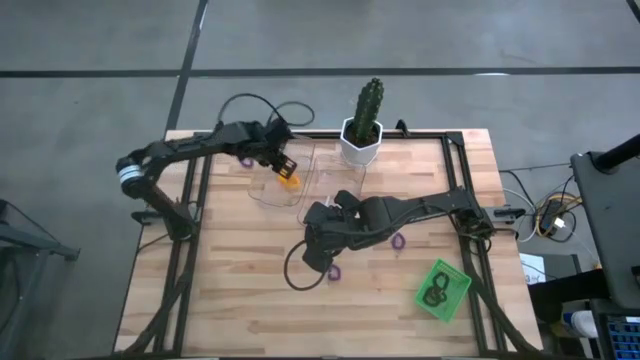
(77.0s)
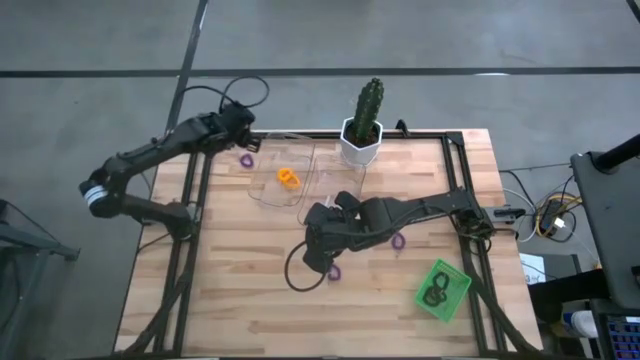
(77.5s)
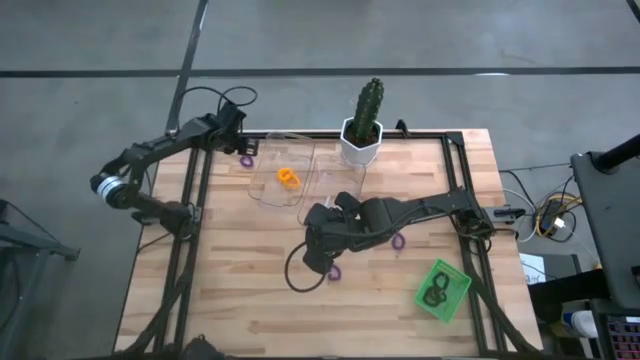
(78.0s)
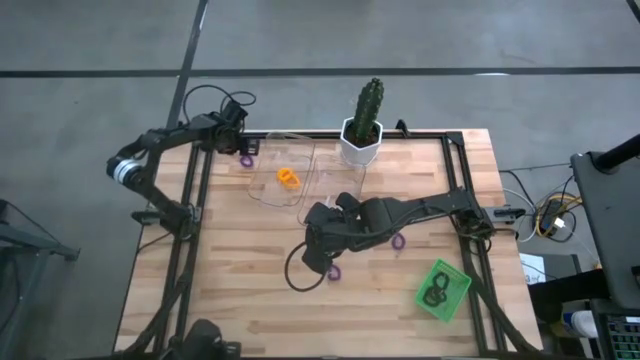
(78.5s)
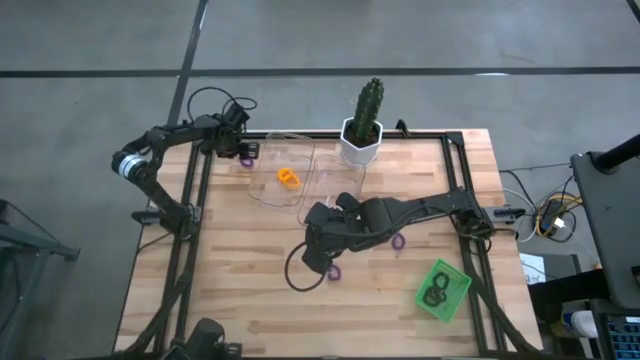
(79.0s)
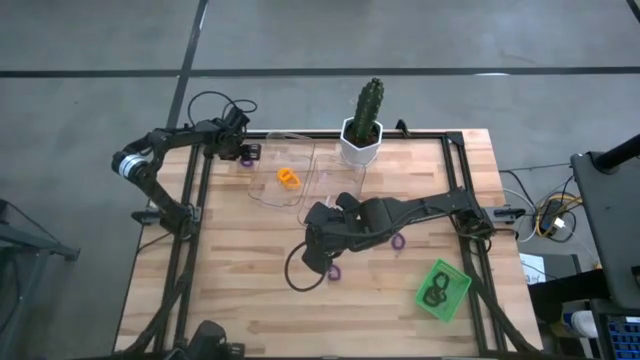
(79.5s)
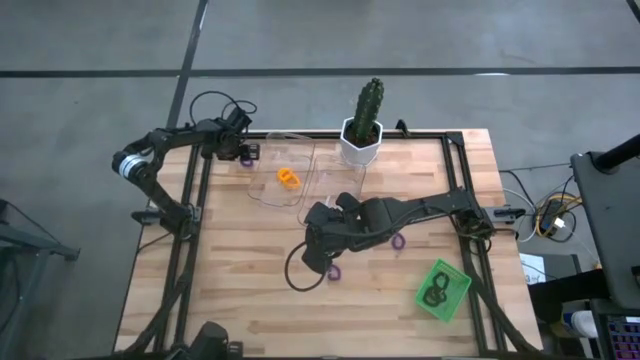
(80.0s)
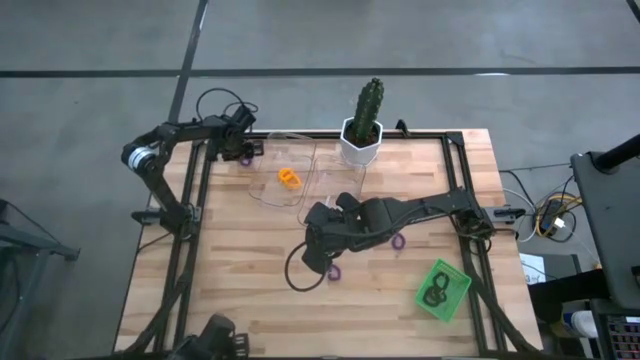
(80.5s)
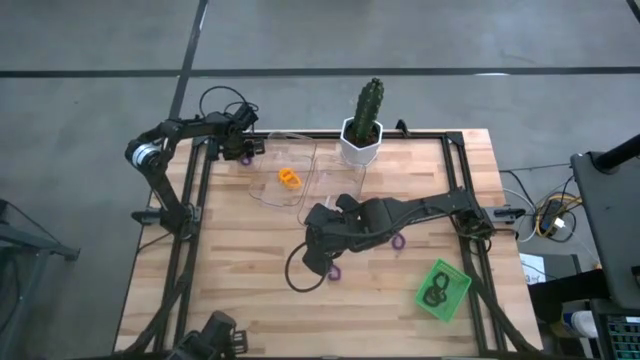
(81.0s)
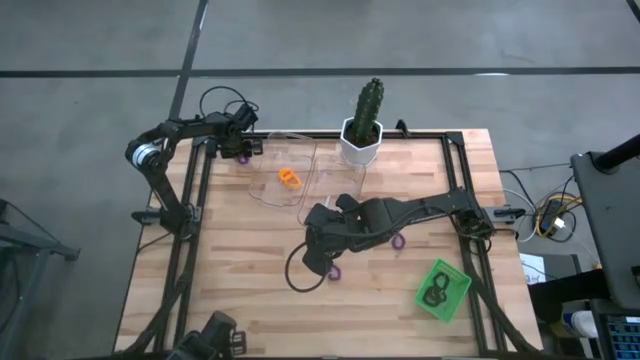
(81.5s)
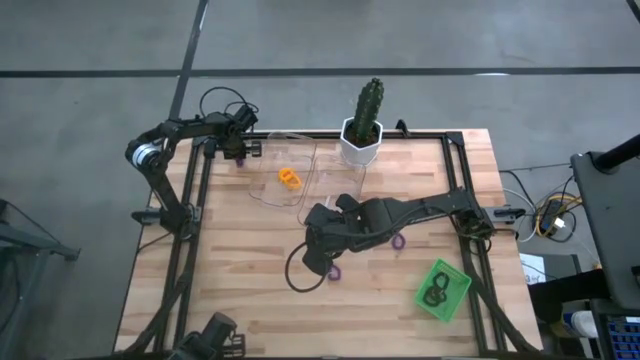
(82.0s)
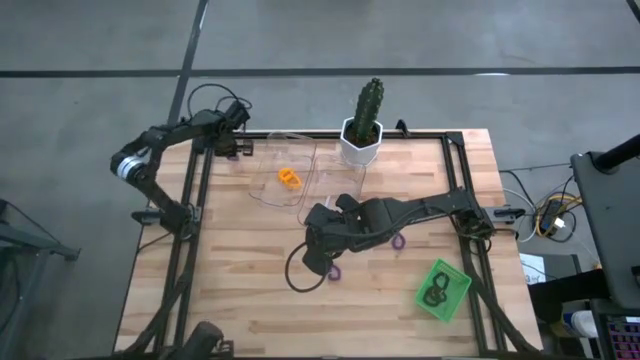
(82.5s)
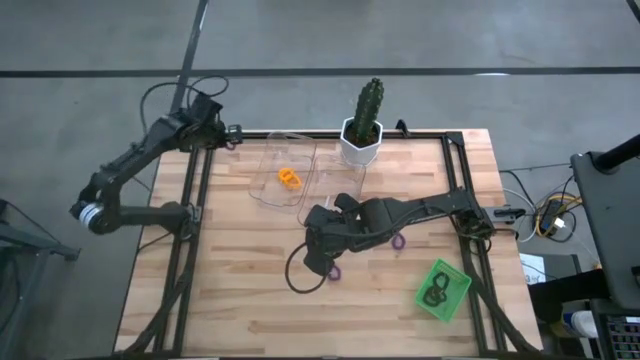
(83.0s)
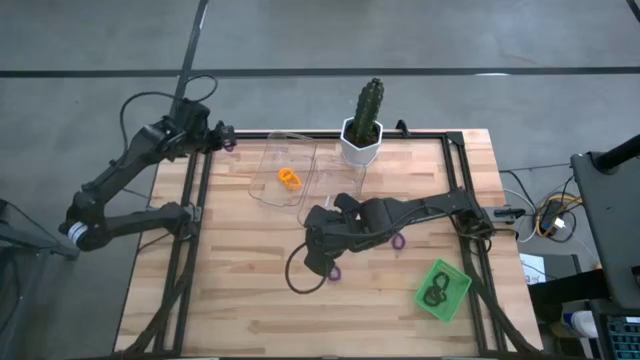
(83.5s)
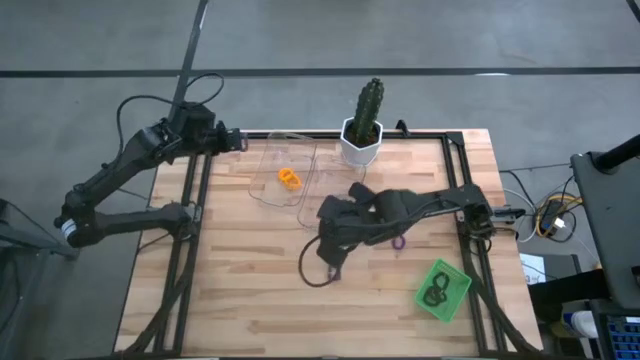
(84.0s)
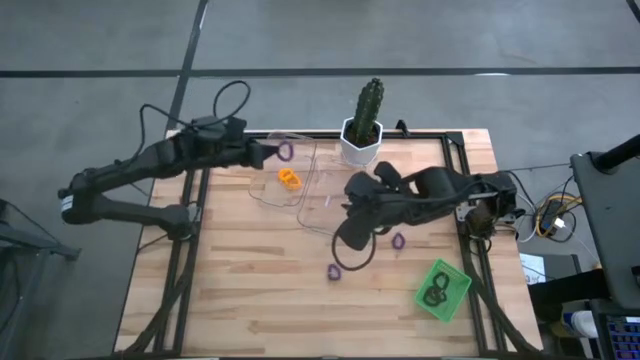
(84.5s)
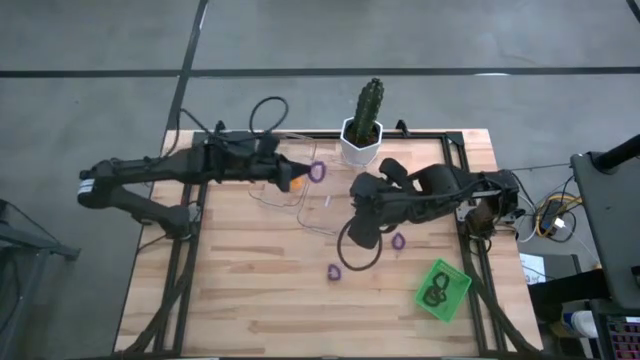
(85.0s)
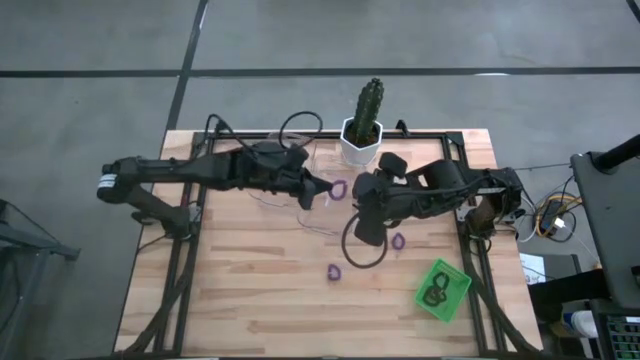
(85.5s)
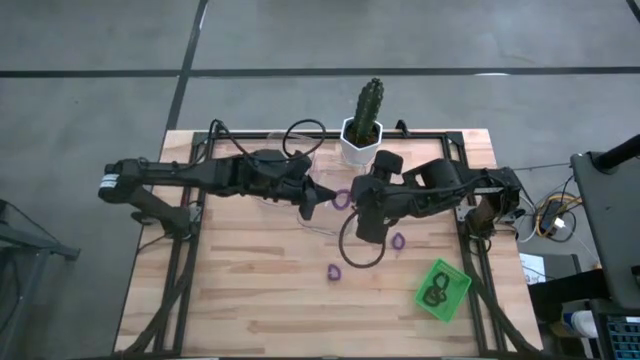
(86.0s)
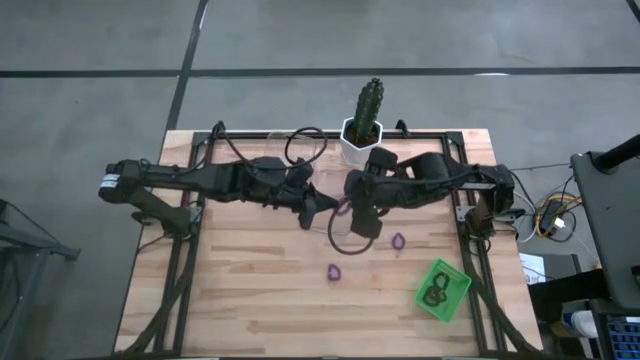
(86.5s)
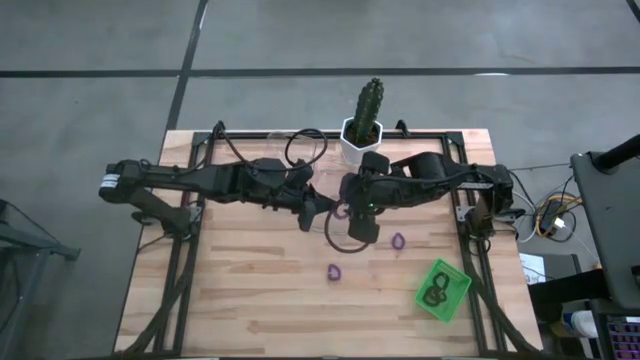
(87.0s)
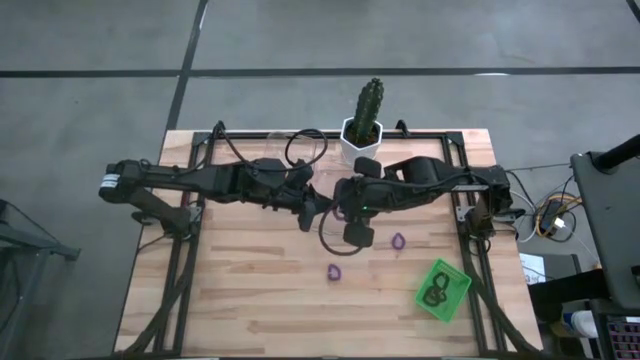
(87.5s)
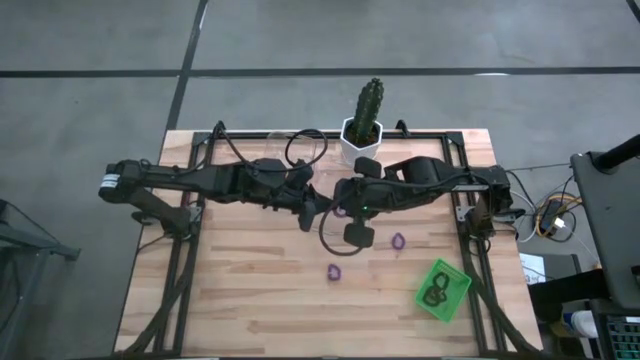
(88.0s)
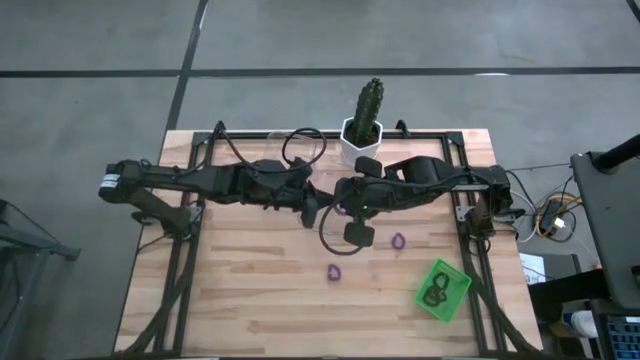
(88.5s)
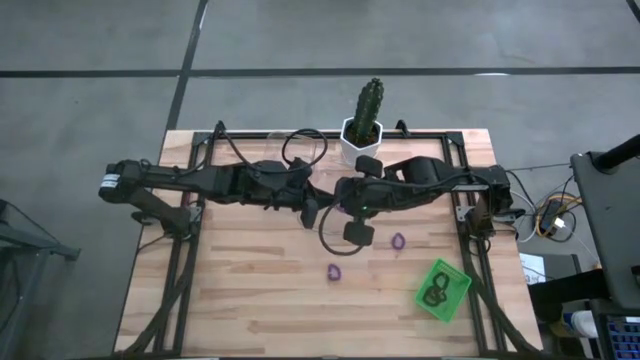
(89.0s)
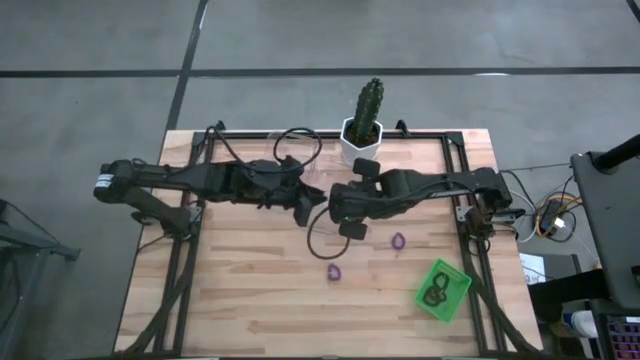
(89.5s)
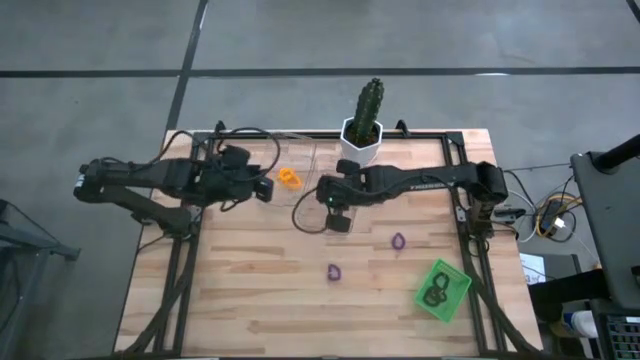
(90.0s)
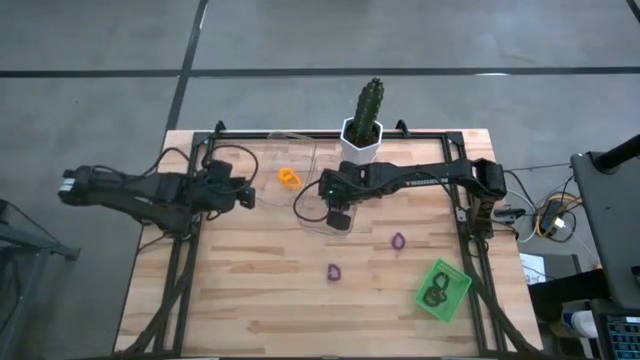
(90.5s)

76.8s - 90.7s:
Task: Sort spring keychains
Put the top left violet spring keychain into the right transparent bin

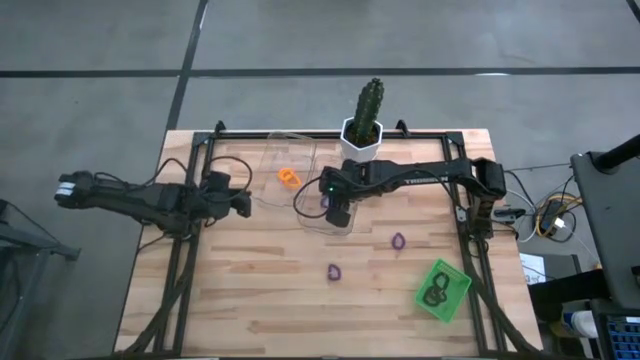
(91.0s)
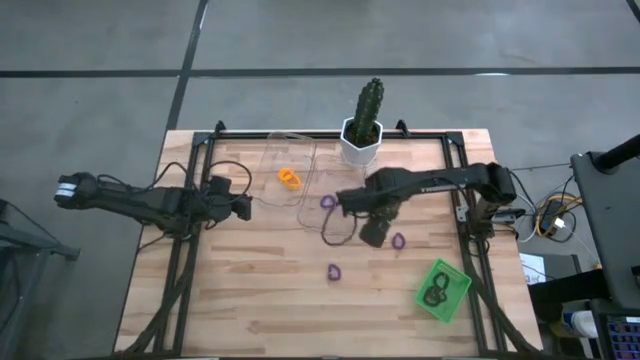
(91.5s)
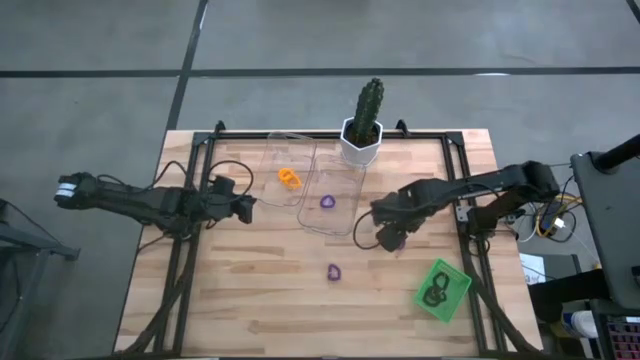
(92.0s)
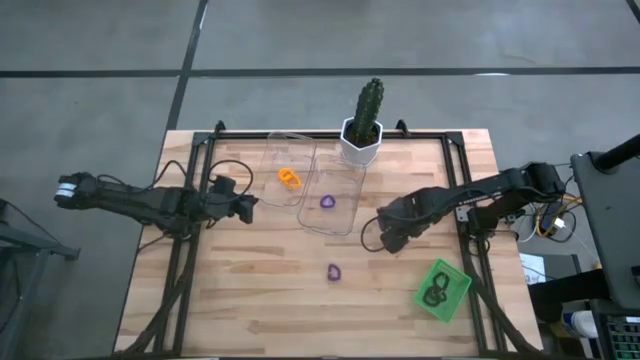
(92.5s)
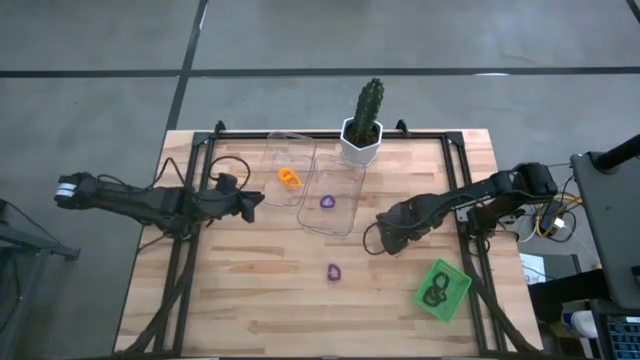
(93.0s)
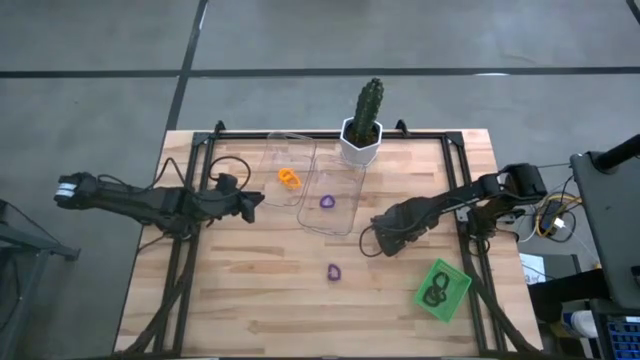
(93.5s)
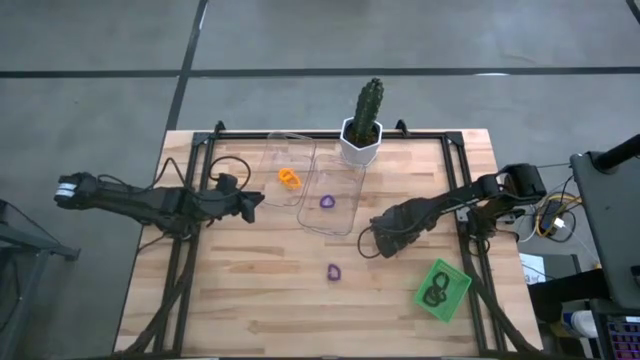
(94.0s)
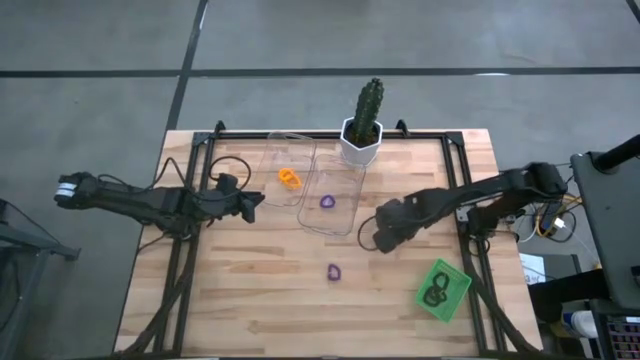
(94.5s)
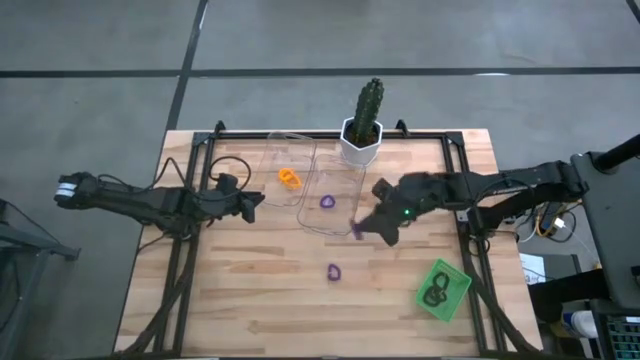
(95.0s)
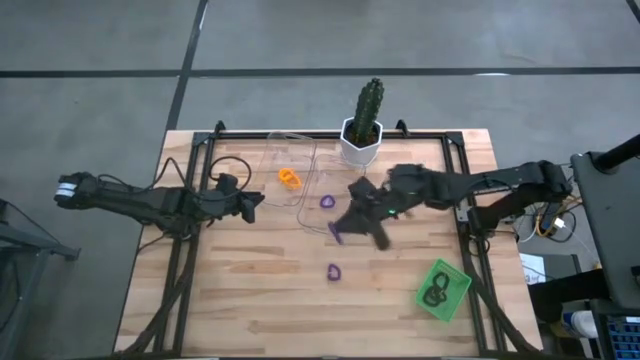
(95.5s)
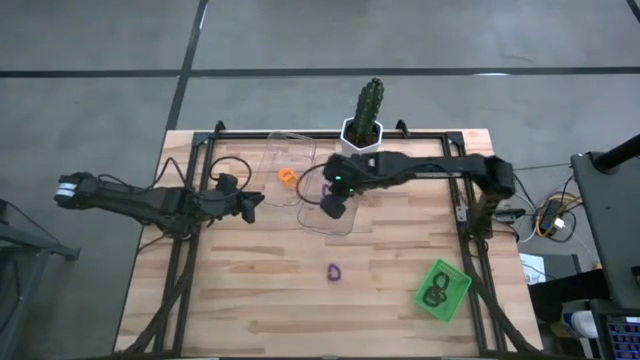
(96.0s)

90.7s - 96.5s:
Put the right violet spring keychain into the right transparent bin
